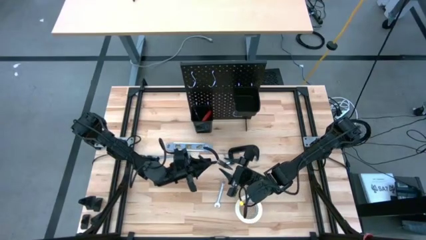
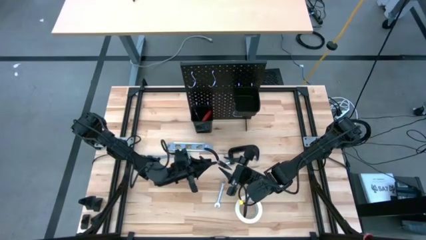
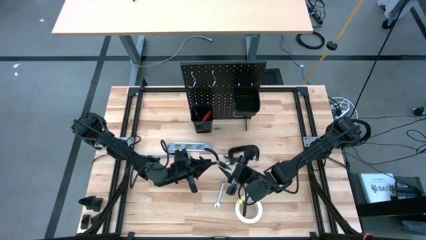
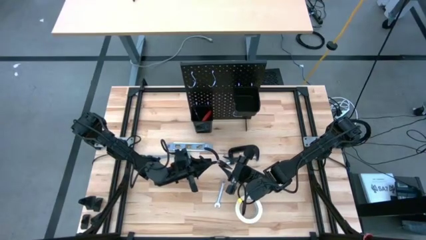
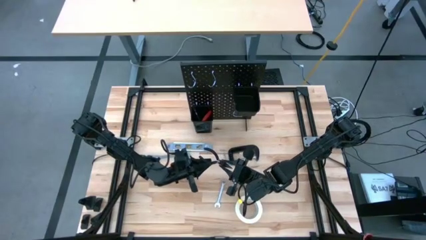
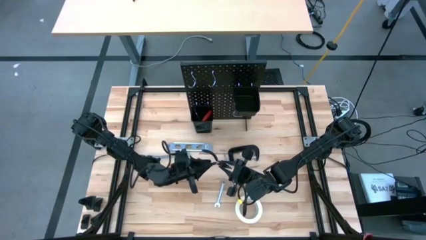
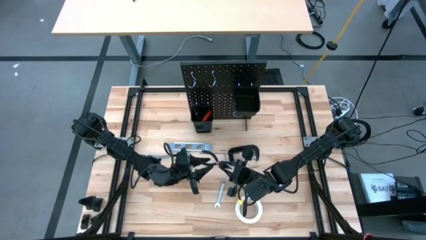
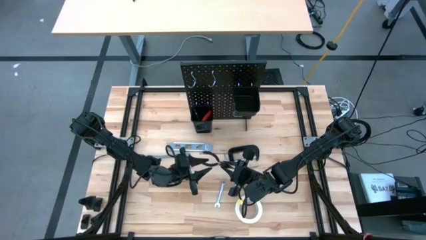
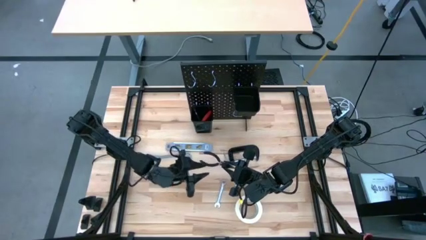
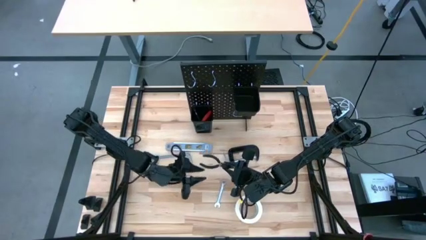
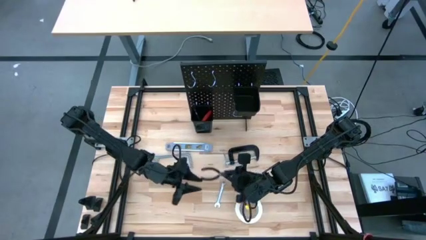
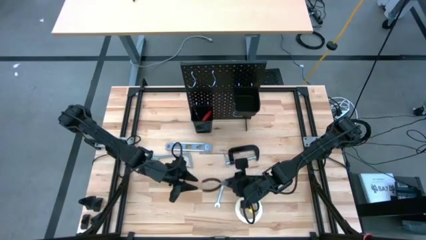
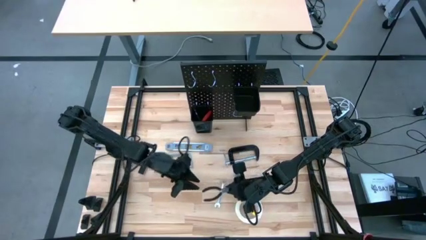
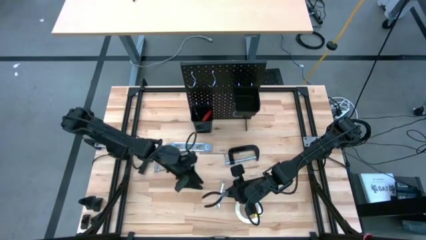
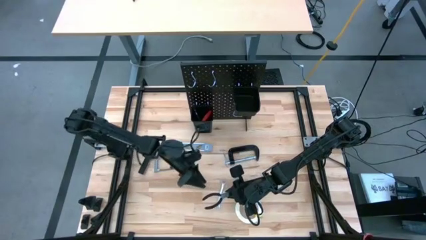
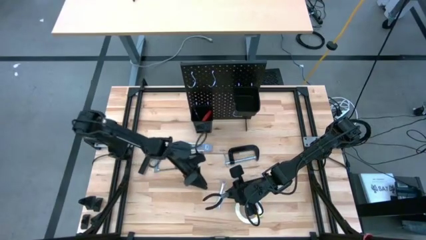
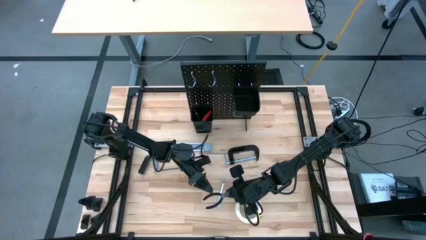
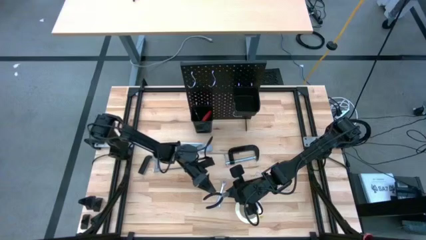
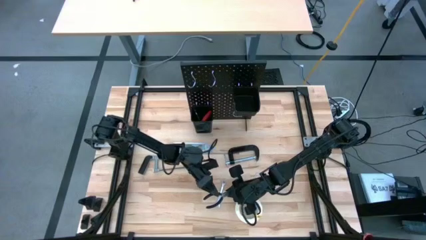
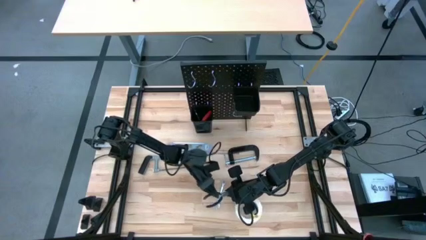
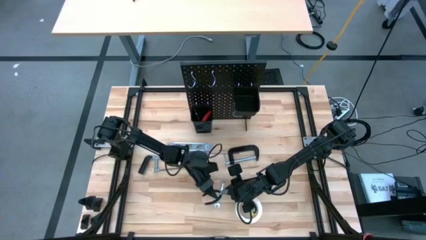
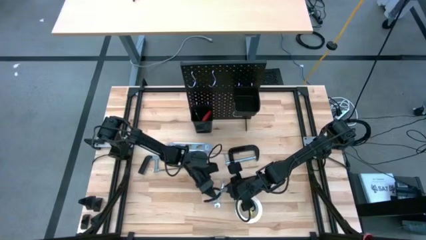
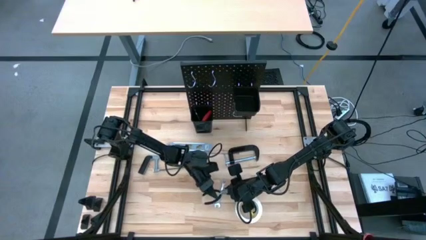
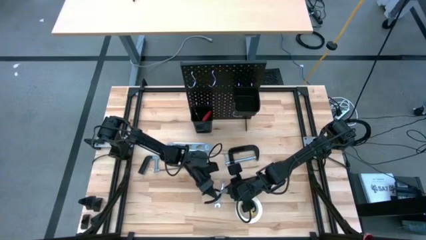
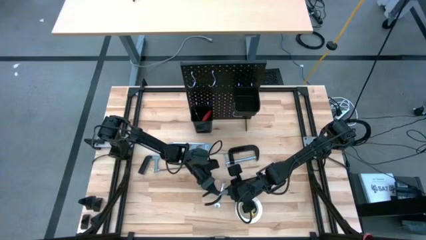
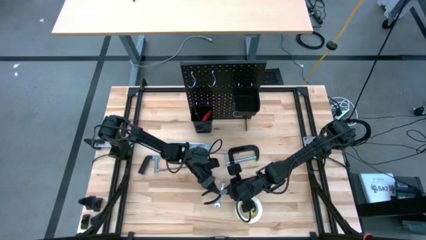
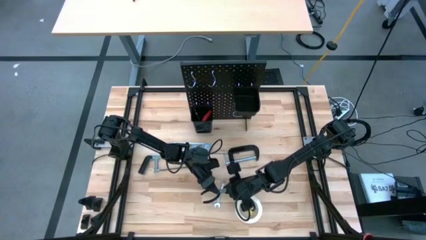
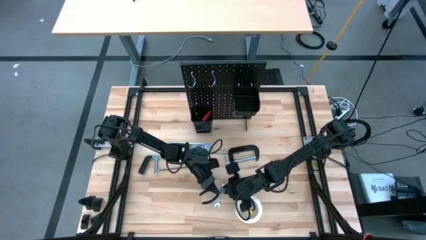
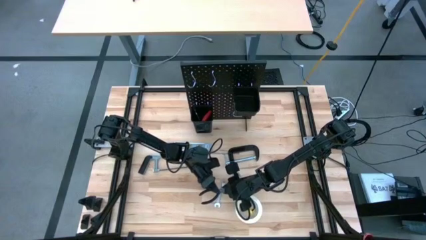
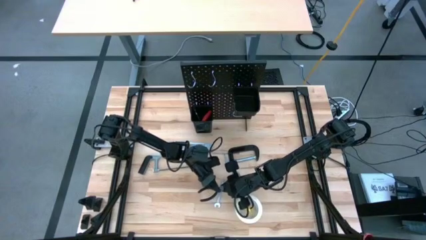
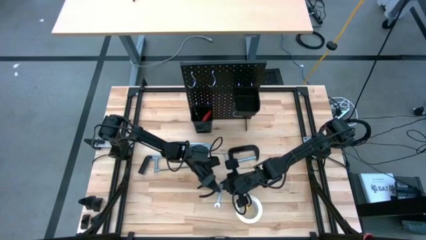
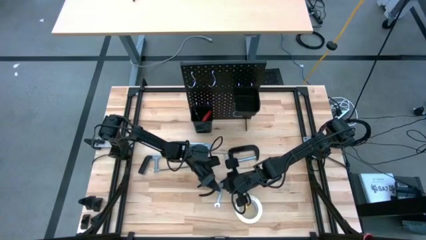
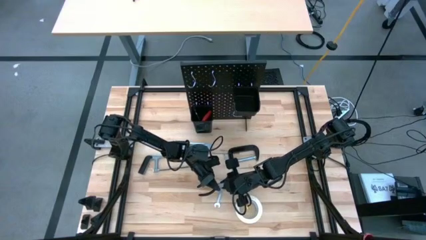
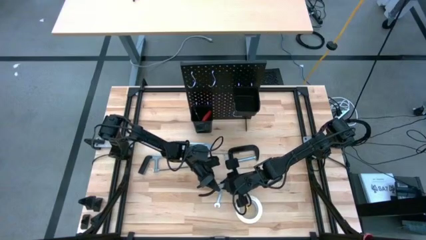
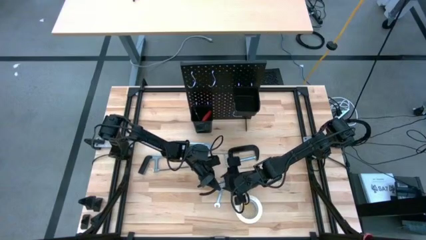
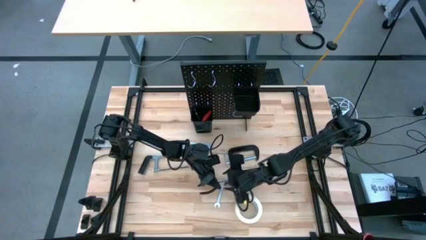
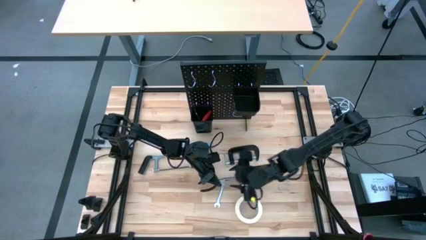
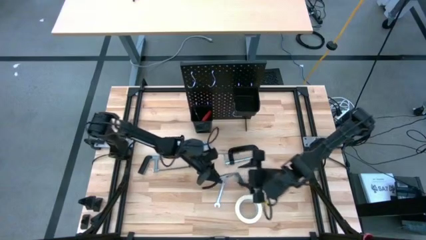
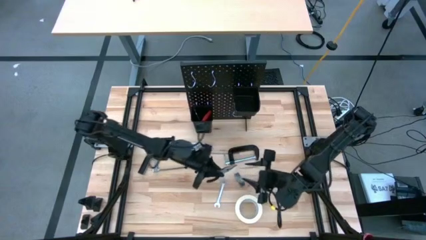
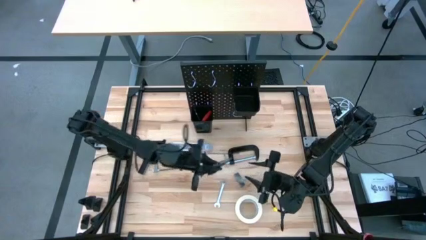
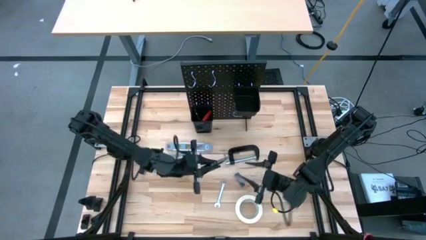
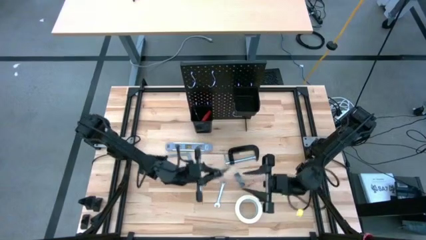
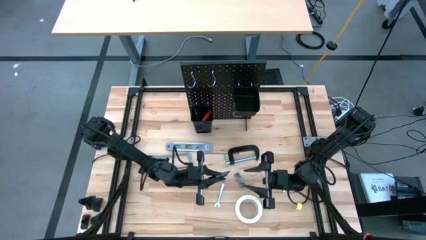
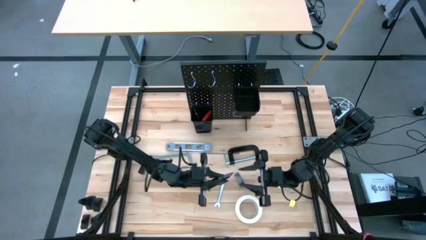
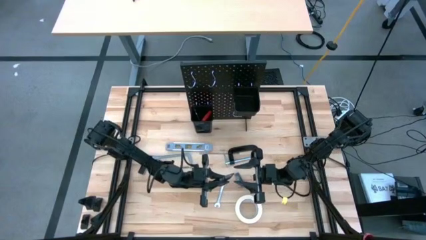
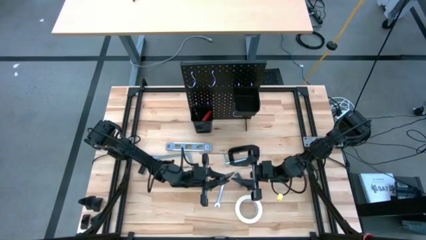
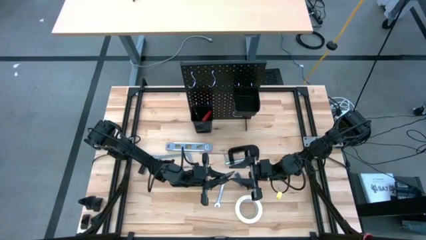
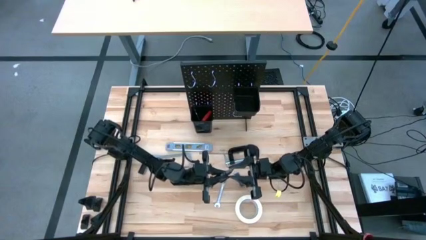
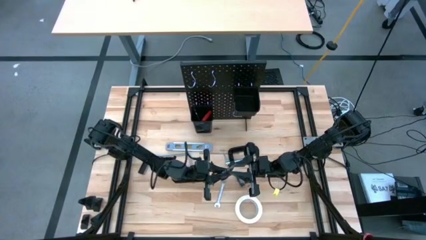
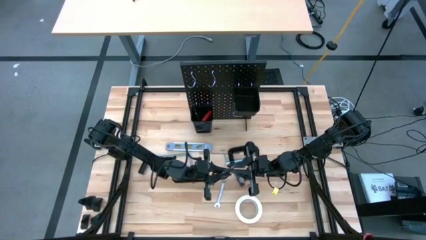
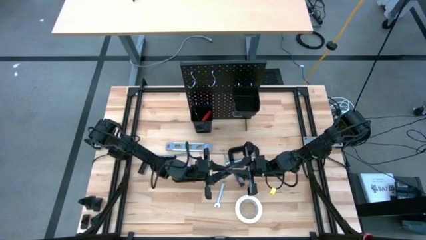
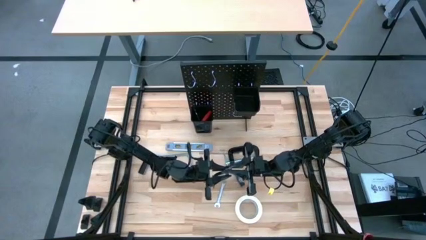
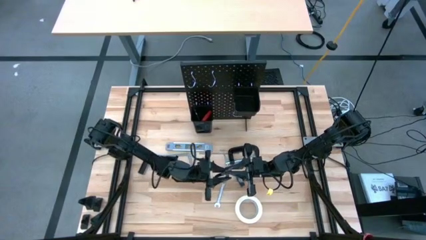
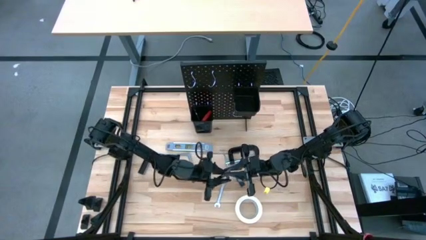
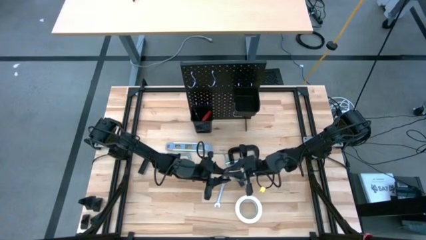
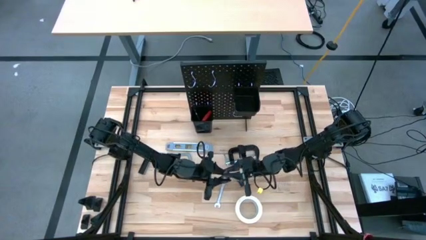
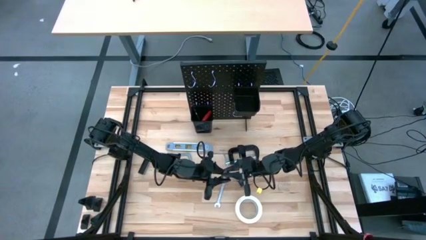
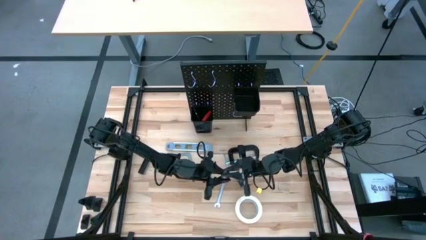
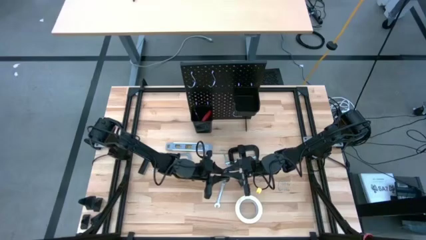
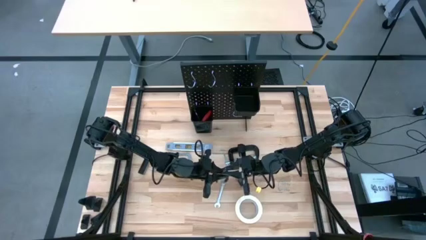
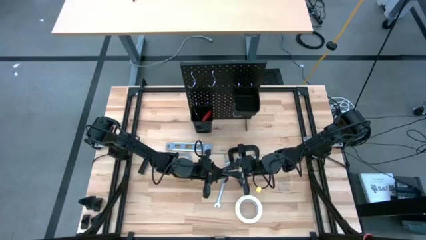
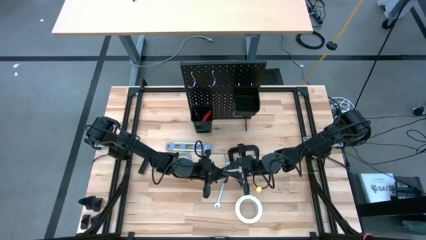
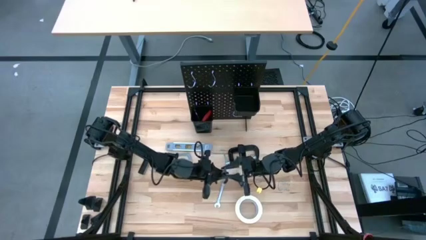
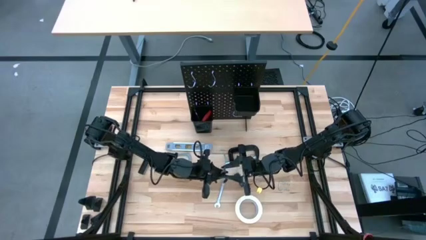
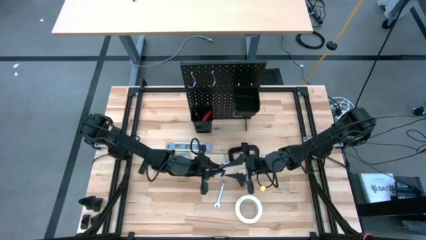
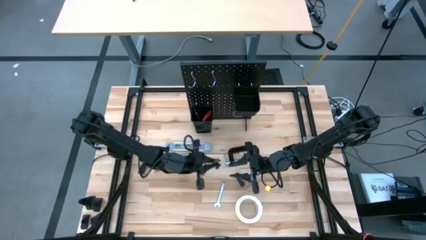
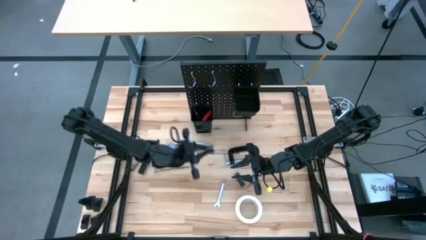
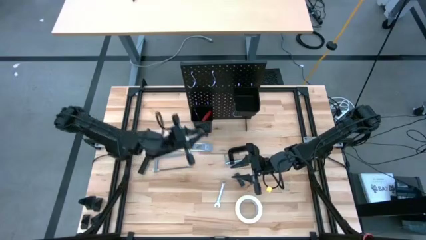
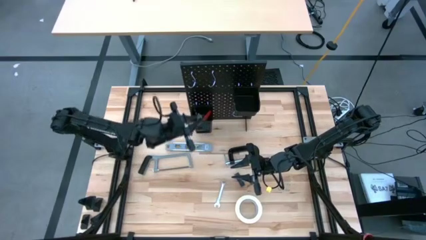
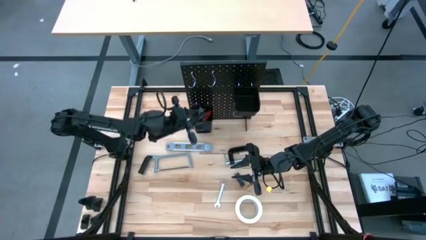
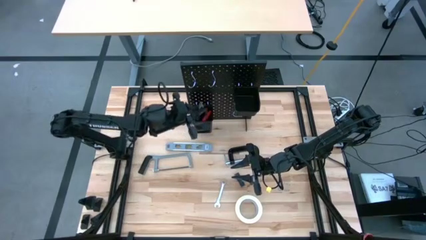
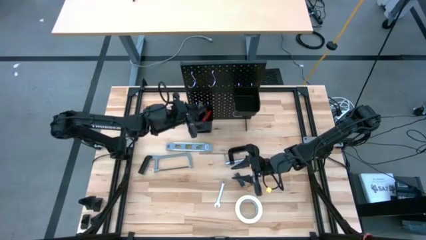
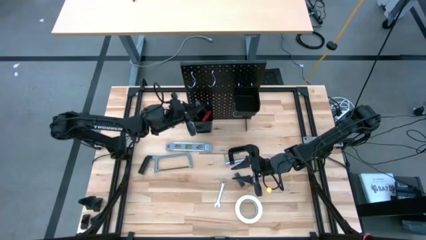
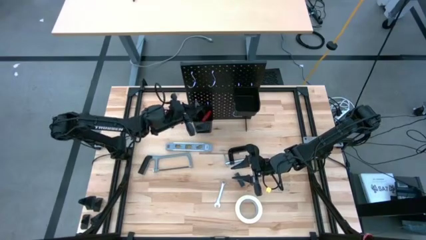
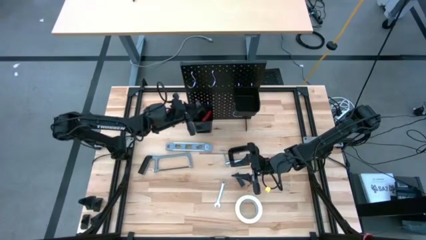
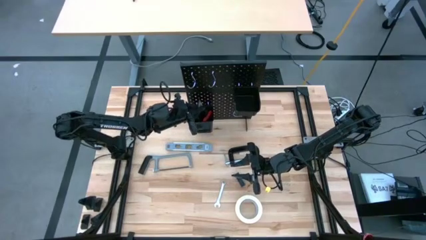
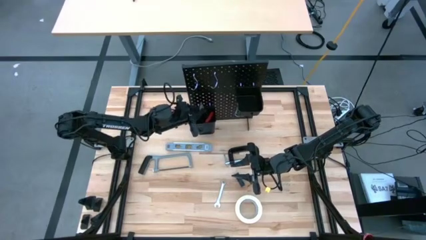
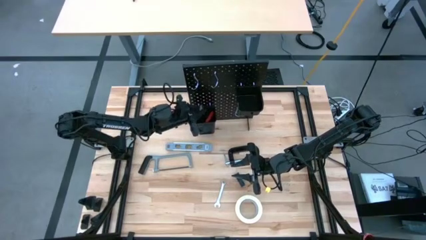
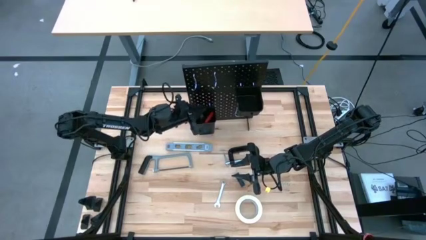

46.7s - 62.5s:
Task: Hang tools onto peg board
Put the long nose pliers into the bottom black bin on the pegboard
